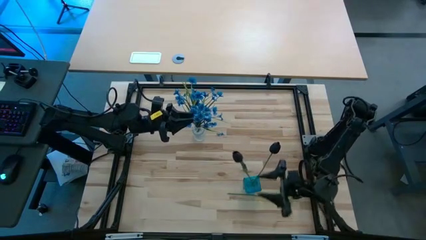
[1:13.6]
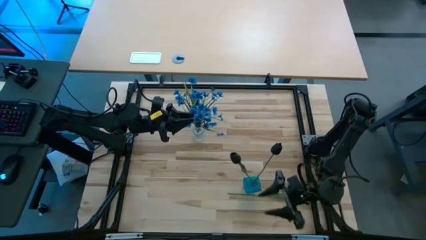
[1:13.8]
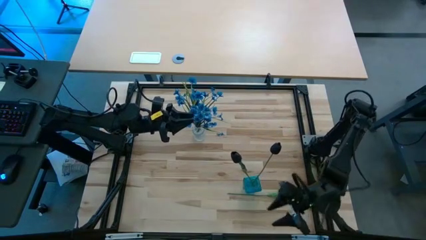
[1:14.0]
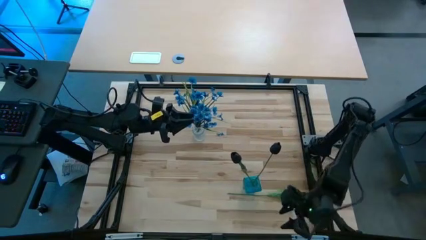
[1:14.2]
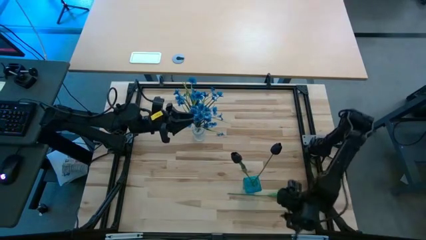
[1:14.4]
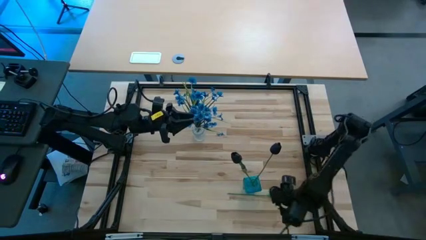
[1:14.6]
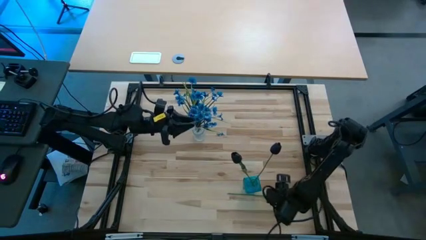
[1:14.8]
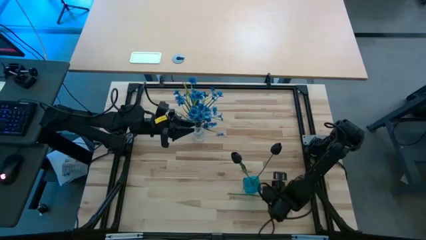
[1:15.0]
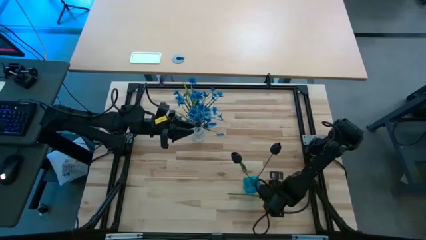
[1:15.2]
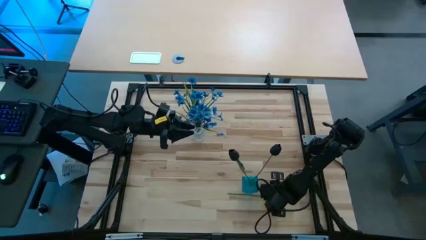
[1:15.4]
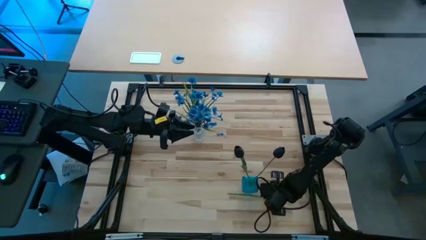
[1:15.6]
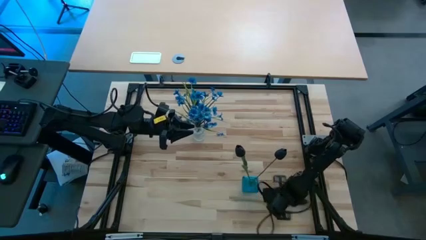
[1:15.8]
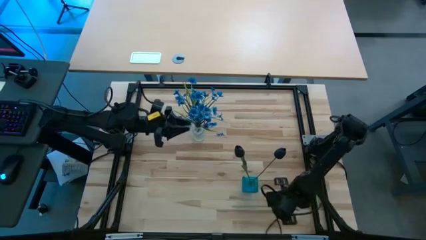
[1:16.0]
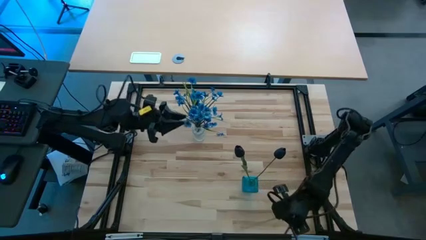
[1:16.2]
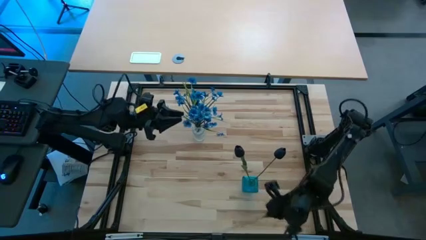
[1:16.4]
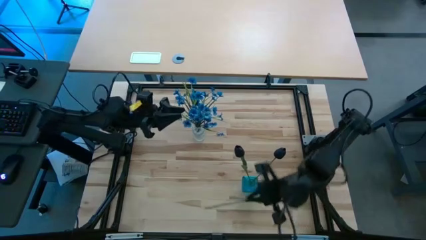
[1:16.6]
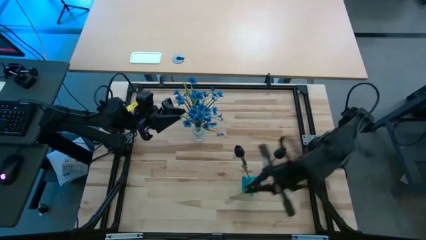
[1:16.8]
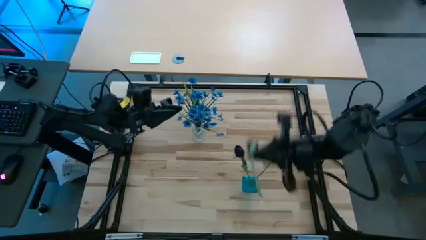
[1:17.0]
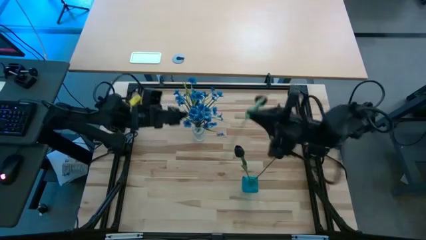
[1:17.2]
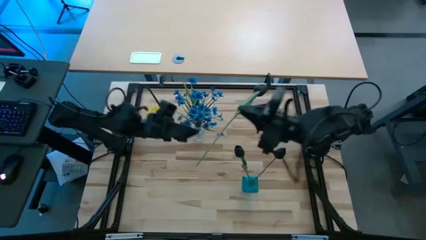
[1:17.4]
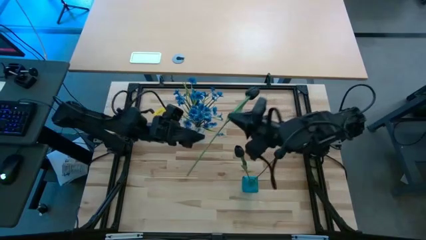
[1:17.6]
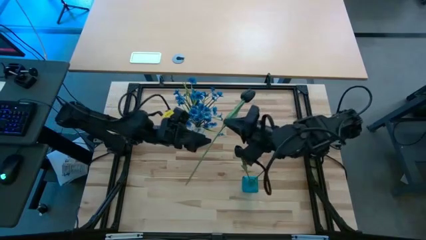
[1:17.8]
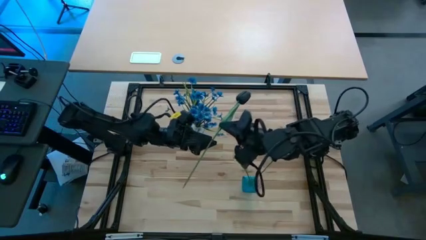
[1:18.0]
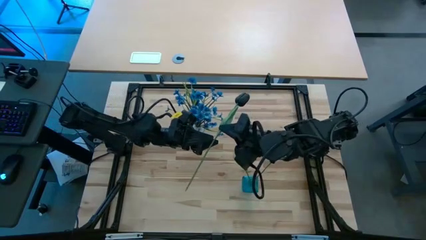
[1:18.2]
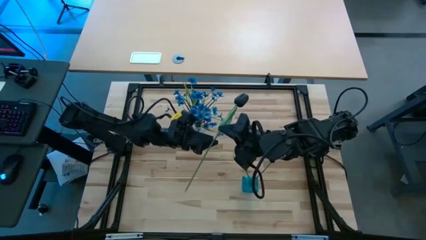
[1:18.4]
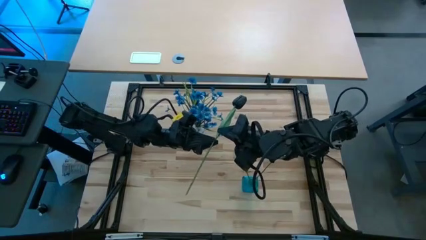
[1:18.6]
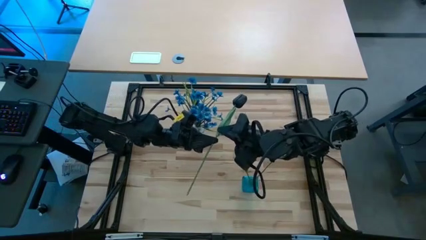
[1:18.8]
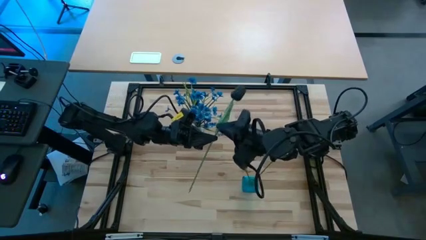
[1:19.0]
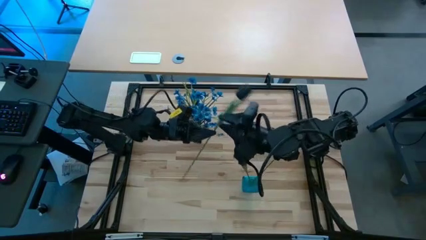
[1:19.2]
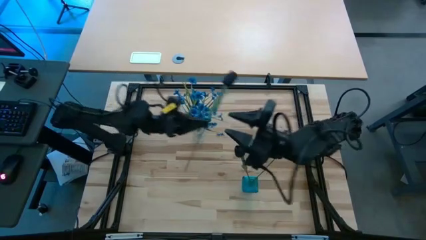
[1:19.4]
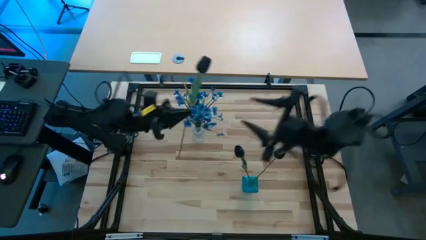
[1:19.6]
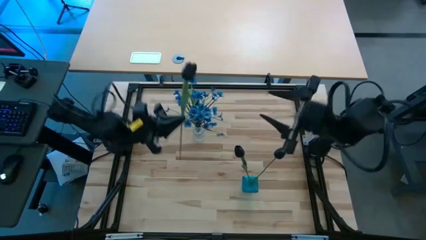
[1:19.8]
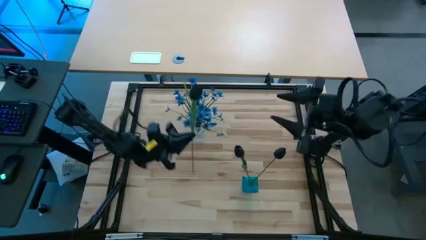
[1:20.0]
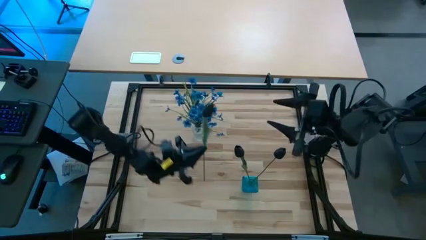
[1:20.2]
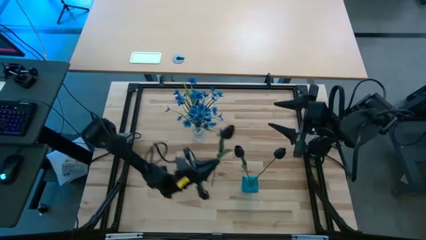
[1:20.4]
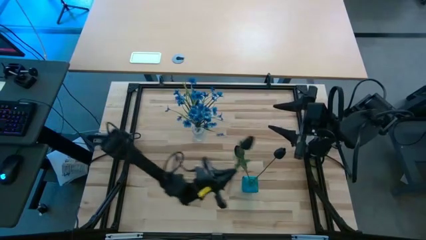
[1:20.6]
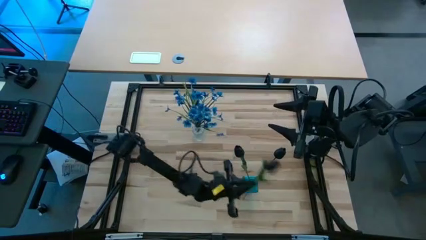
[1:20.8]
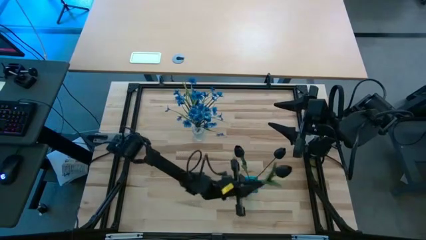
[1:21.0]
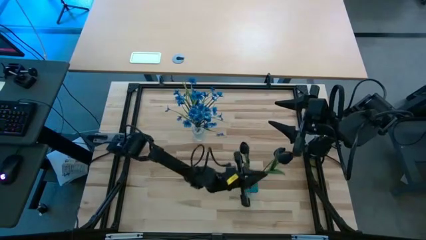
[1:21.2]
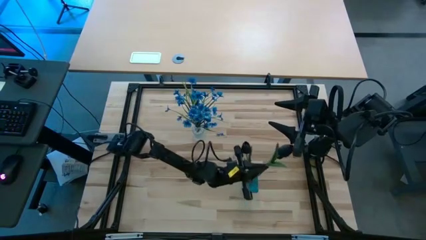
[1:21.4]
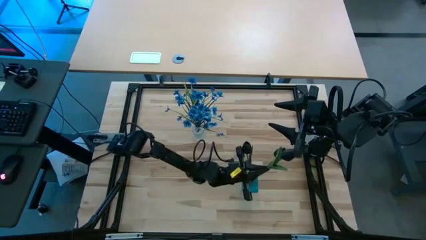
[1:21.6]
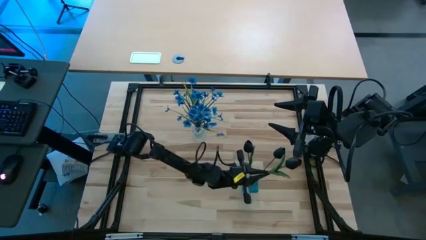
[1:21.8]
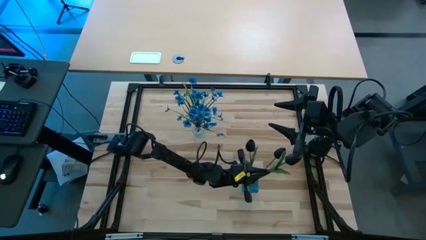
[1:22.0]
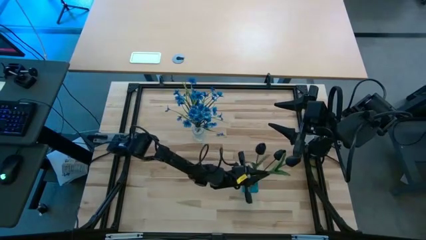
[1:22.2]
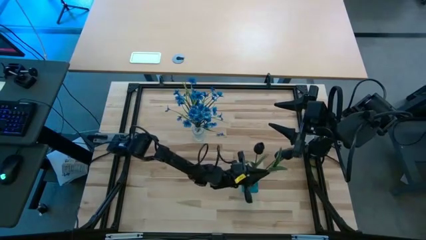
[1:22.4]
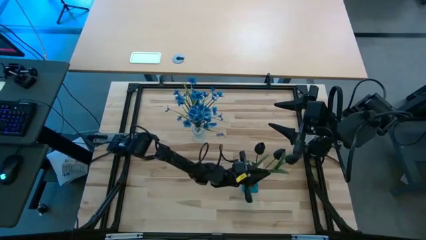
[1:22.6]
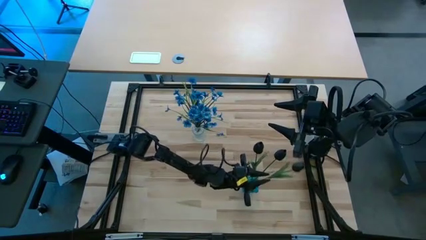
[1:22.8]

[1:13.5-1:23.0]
Task: Sort flowers into vase by color
Put the dark blue flower into the blue vase

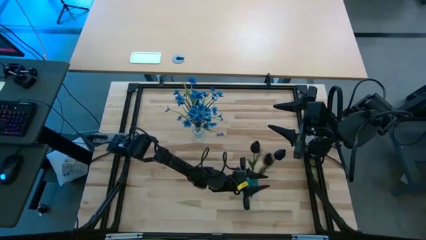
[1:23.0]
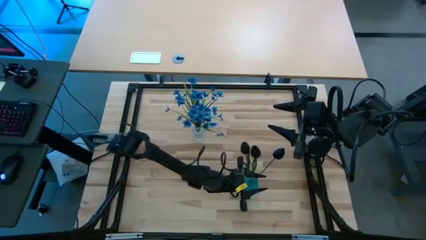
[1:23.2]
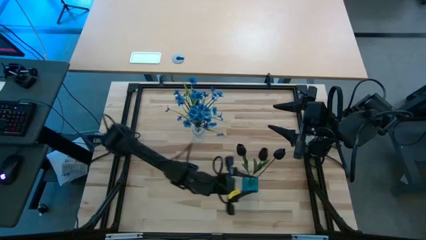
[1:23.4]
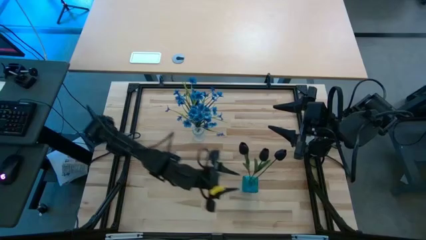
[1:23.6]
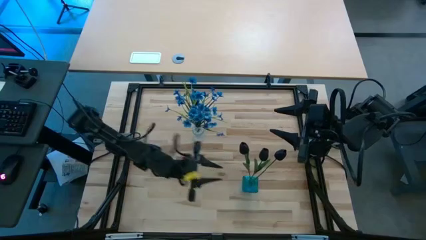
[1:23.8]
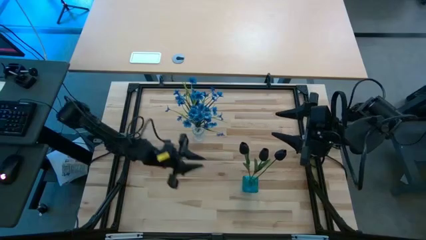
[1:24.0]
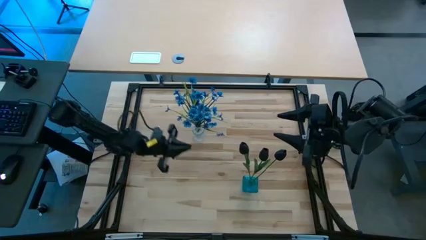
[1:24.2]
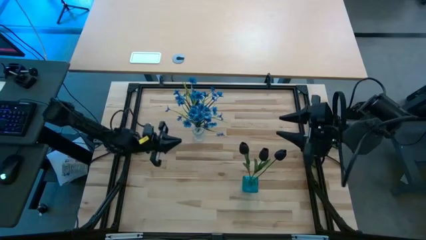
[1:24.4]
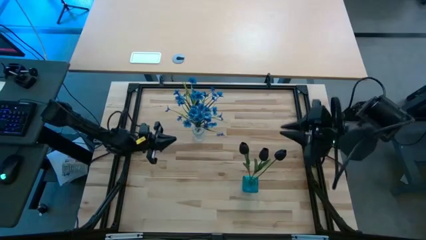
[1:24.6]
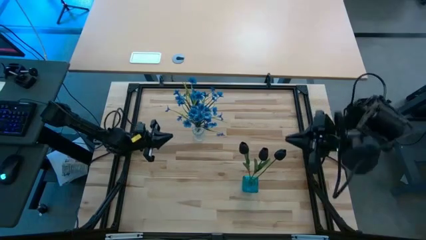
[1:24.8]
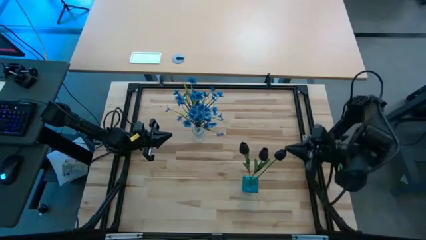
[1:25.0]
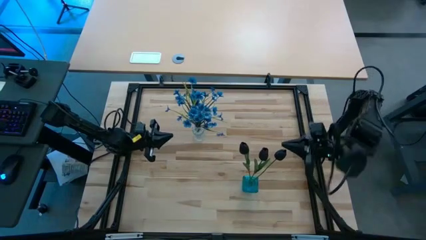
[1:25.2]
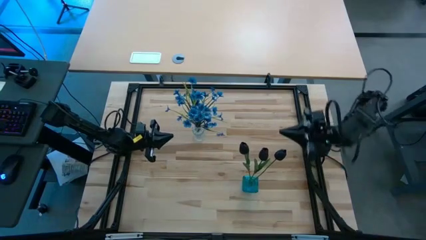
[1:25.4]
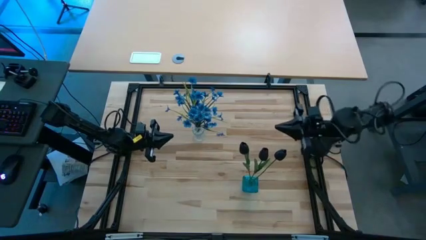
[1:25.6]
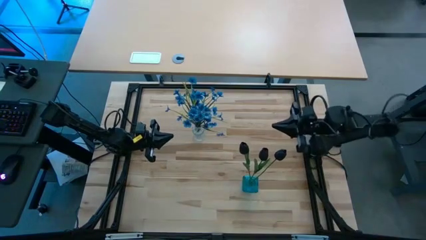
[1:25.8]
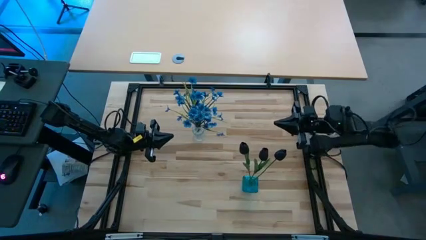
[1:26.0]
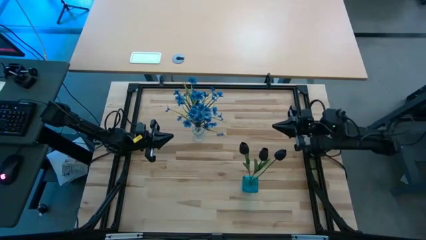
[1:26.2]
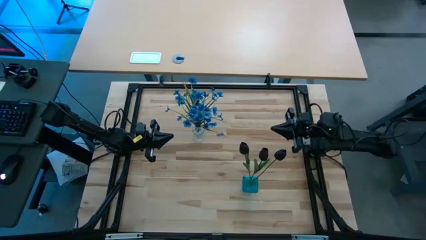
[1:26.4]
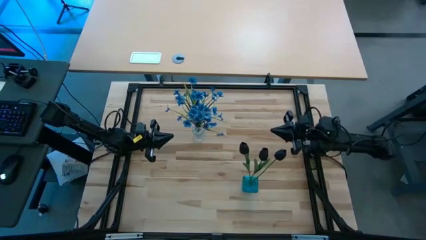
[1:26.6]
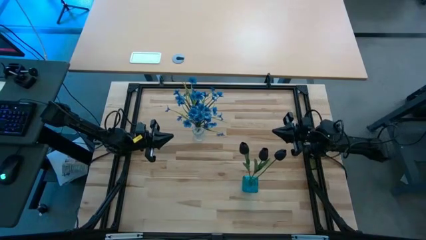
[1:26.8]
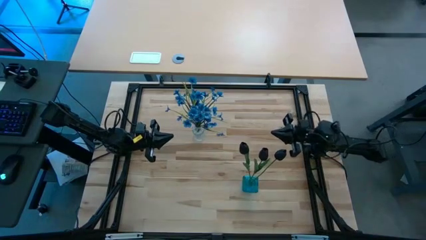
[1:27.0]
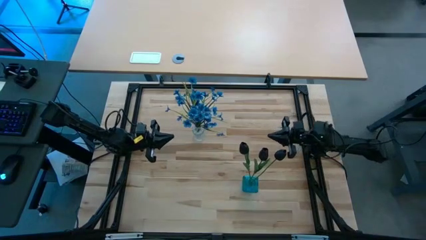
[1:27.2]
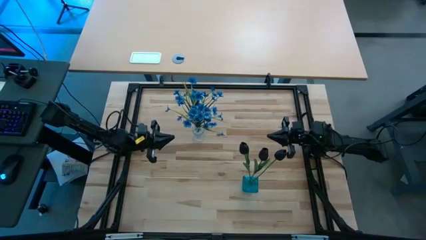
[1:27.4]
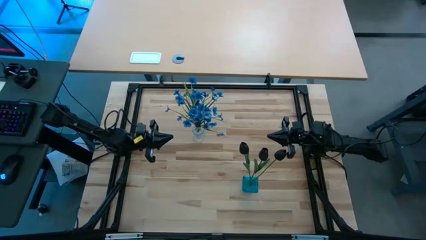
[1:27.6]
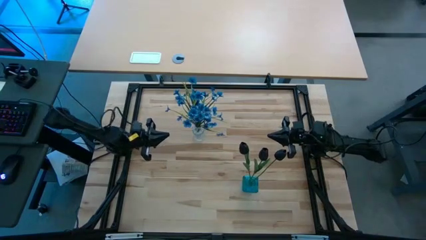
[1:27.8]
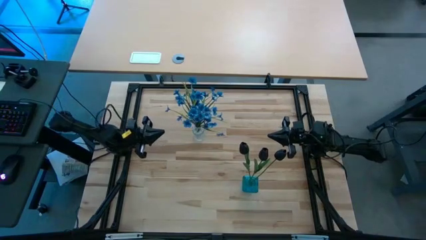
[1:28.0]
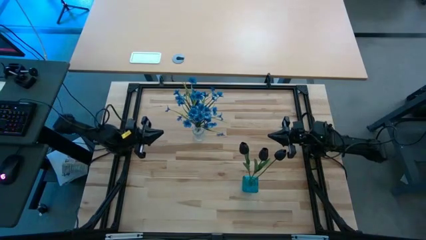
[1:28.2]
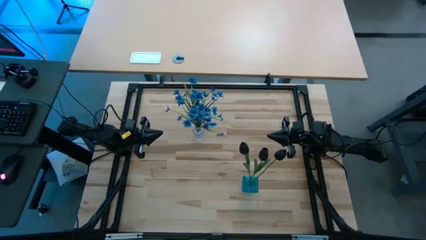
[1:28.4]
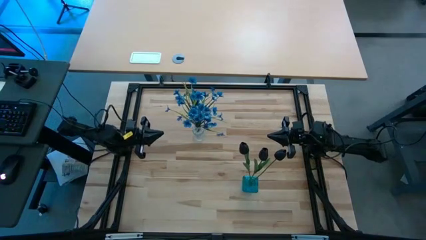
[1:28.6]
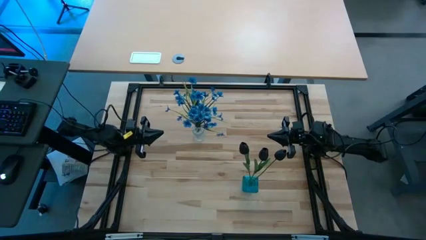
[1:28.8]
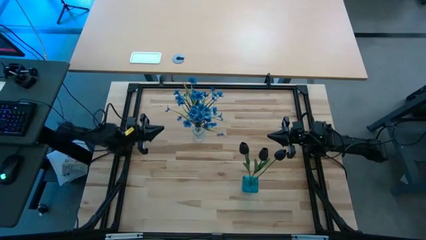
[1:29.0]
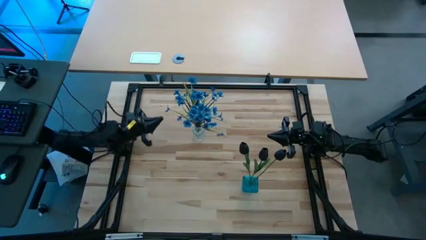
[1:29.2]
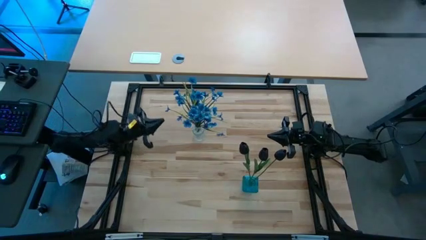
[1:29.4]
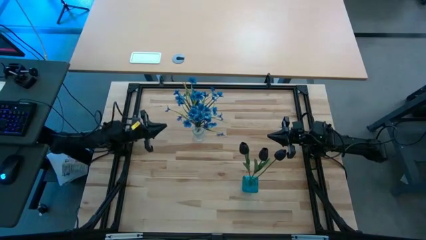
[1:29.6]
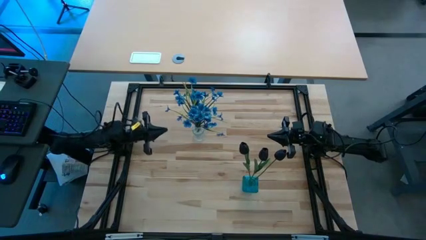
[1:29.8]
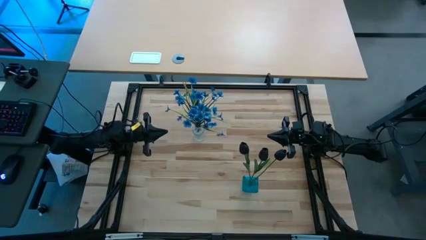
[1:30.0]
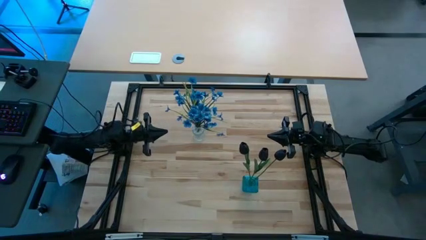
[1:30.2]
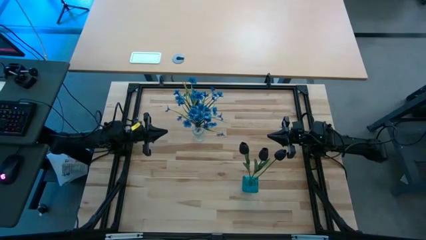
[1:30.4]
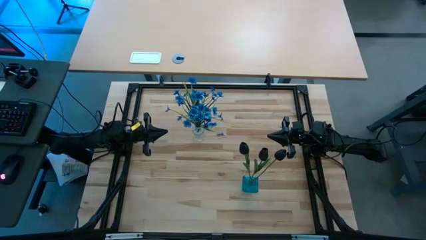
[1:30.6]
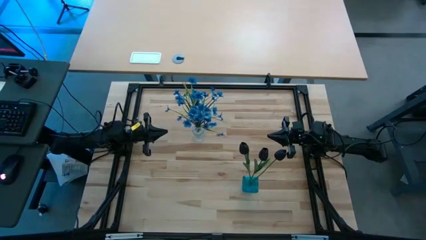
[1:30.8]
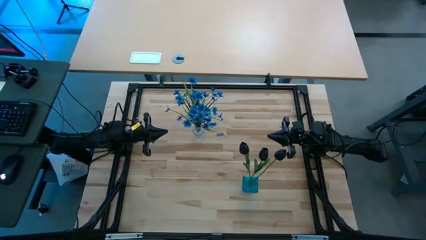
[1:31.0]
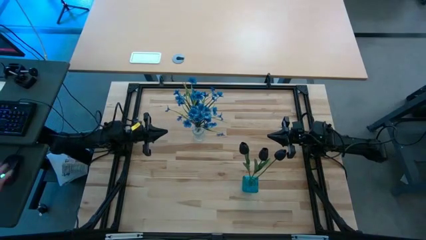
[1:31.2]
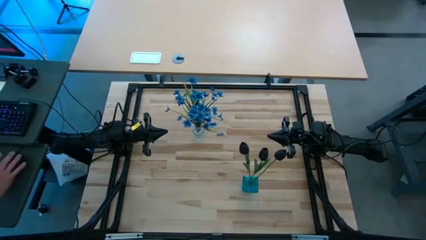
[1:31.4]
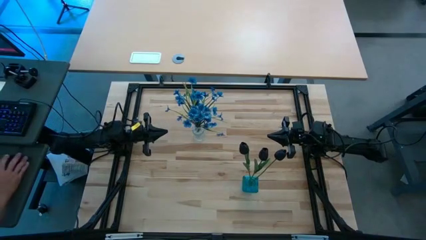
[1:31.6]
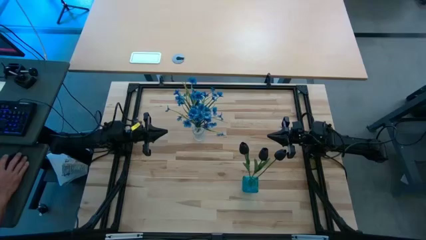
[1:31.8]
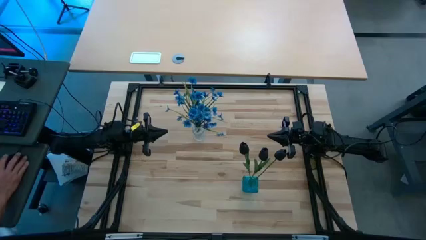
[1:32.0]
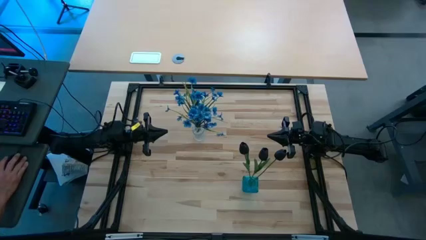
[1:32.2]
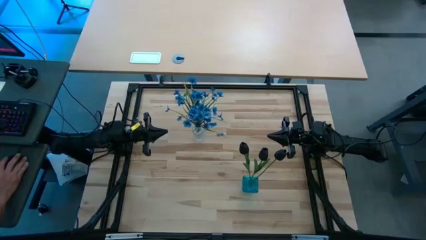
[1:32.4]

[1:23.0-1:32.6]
Return to Home Position
